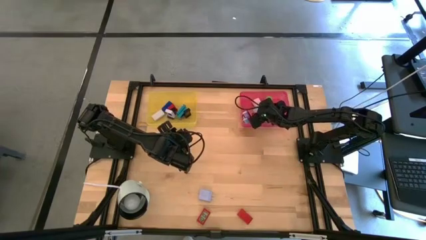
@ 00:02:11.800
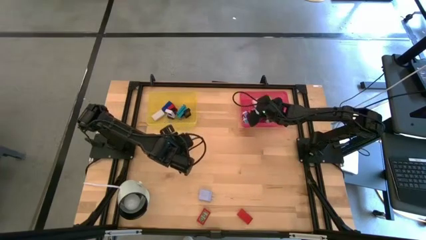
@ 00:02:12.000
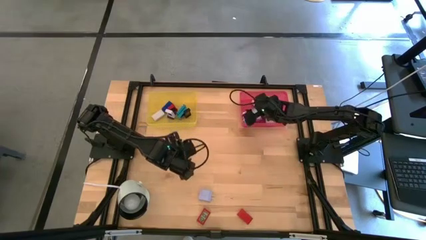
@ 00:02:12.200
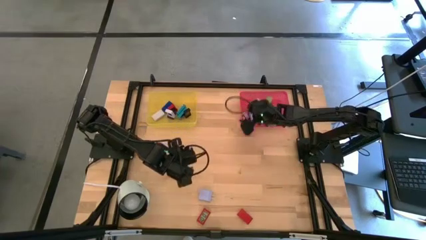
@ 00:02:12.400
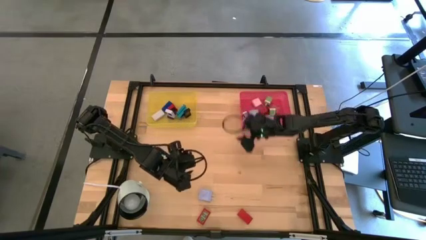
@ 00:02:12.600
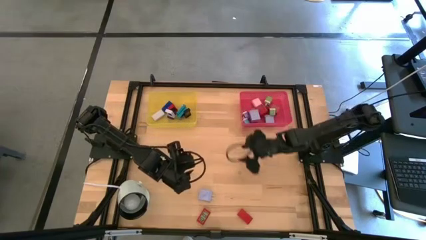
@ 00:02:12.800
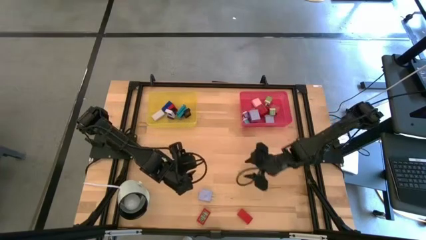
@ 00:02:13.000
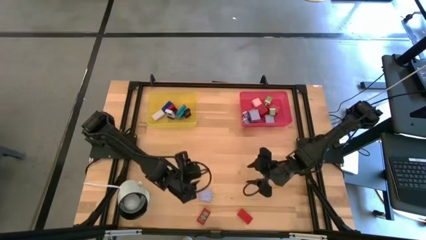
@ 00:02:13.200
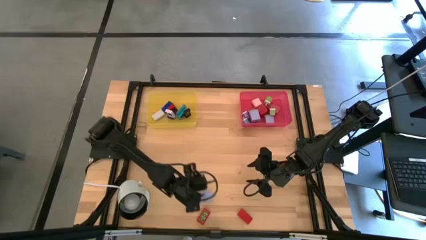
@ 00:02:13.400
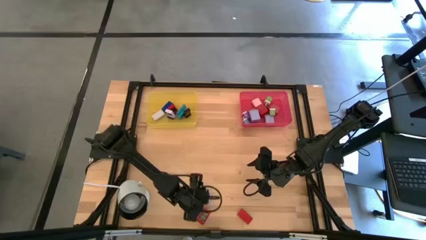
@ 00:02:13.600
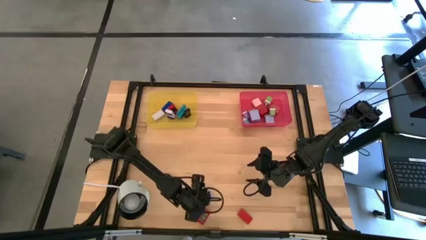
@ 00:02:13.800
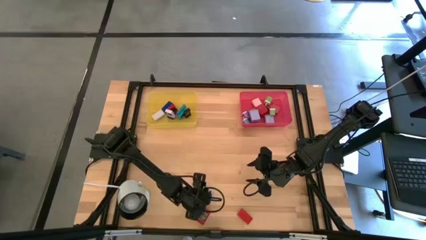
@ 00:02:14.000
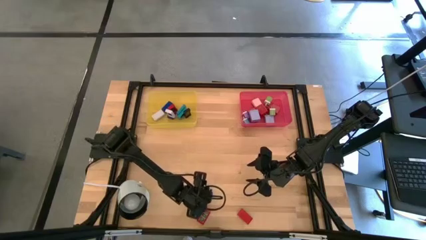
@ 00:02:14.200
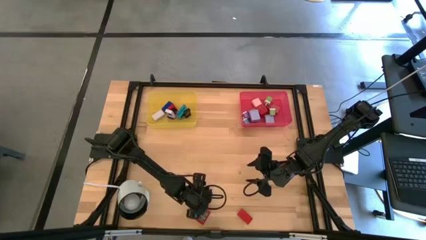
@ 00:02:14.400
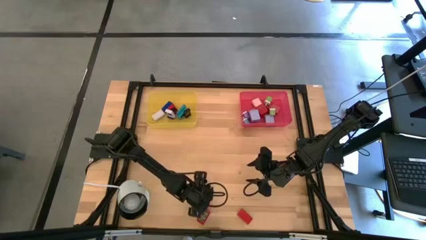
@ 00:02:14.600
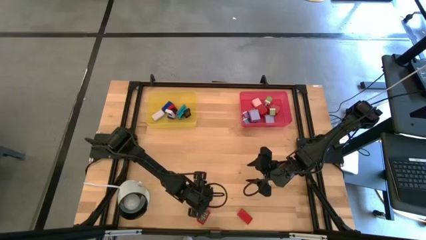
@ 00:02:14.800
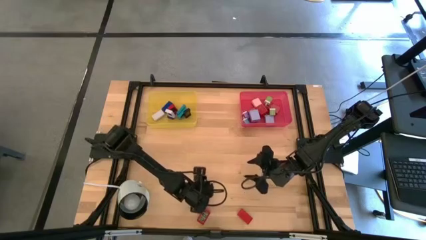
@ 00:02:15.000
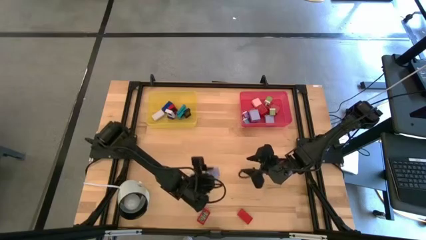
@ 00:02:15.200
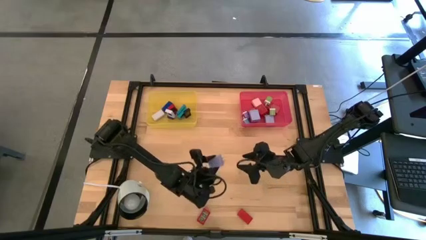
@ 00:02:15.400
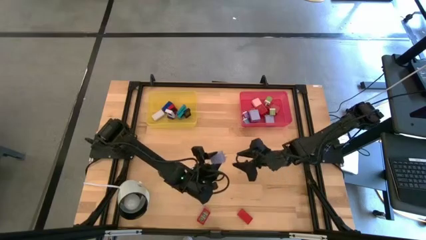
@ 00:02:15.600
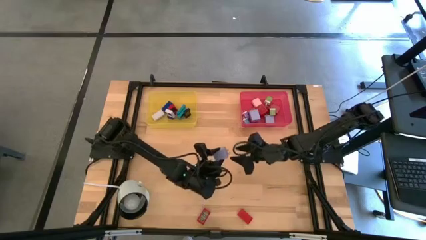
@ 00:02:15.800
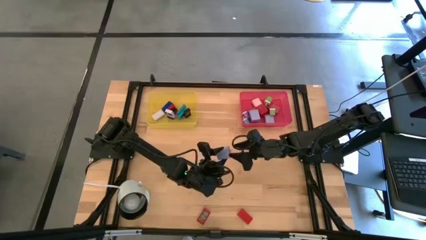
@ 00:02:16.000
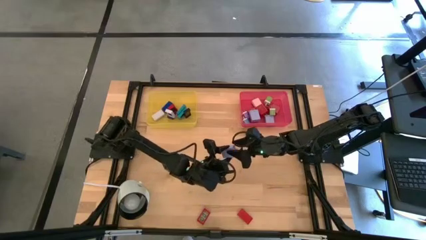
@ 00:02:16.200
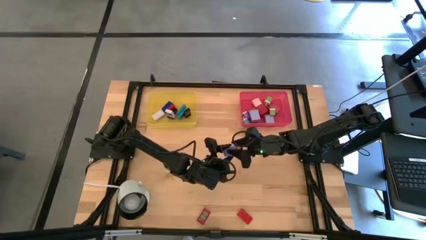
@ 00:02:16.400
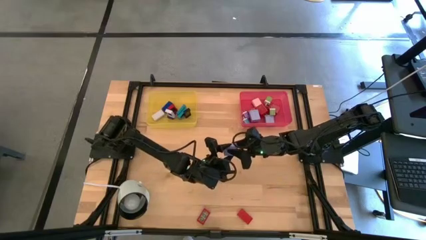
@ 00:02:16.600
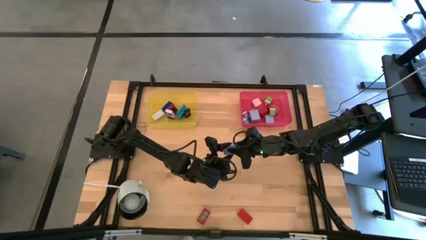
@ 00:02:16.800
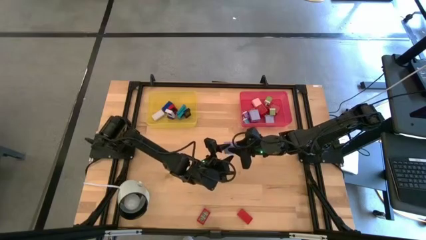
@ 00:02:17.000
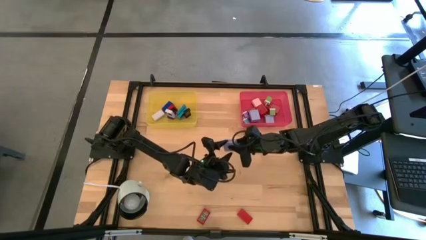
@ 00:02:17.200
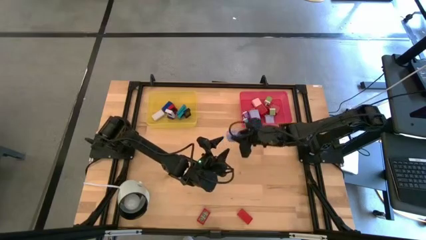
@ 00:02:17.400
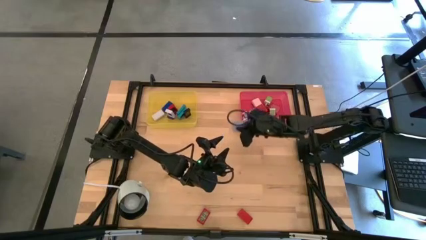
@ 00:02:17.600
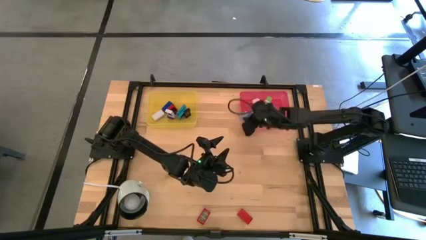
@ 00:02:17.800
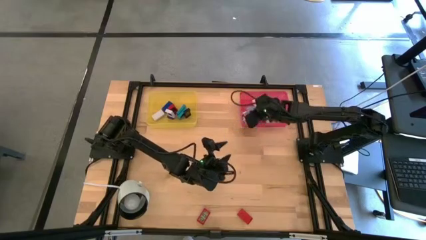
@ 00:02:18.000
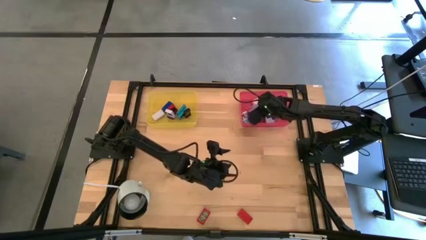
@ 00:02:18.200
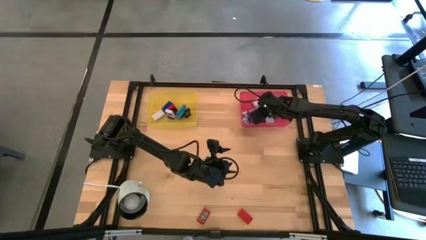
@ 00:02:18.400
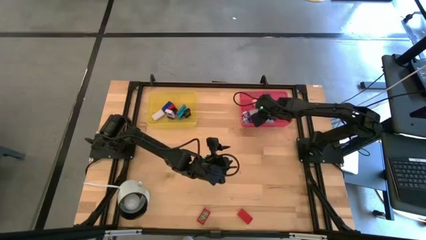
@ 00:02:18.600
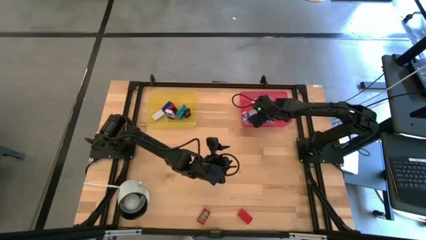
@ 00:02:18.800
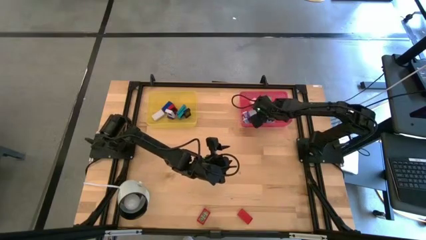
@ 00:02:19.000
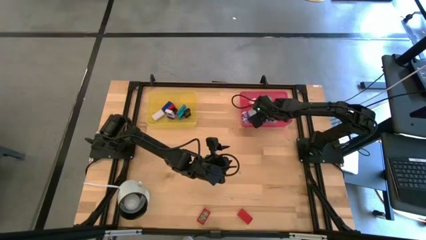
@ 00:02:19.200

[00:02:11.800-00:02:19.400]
Task: Pick & Place Office items
Put the purple charger adapter into the red bin

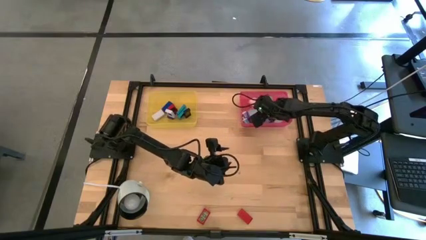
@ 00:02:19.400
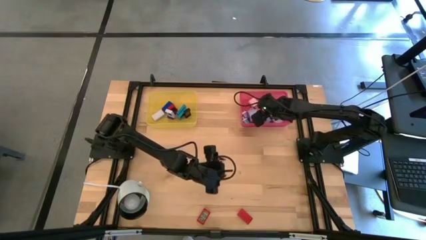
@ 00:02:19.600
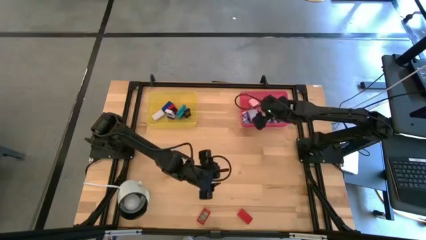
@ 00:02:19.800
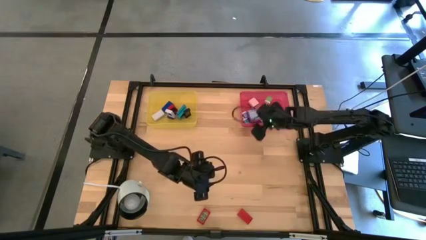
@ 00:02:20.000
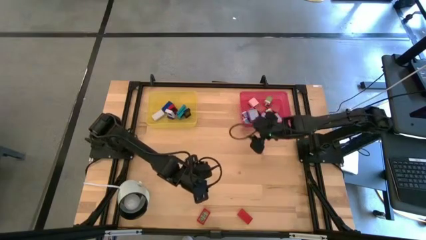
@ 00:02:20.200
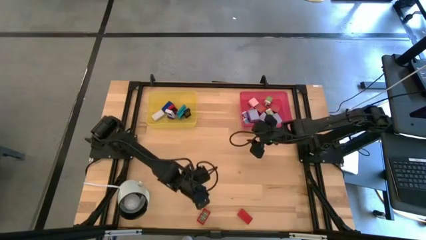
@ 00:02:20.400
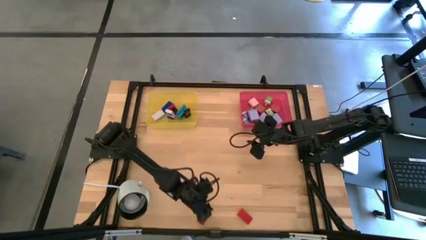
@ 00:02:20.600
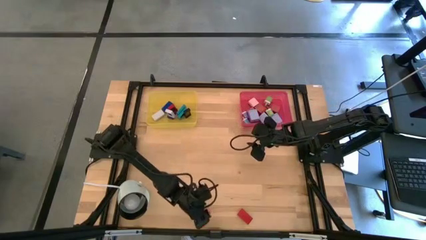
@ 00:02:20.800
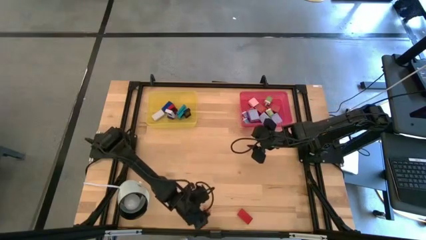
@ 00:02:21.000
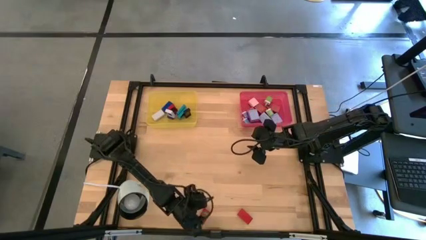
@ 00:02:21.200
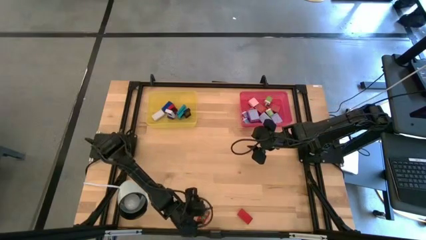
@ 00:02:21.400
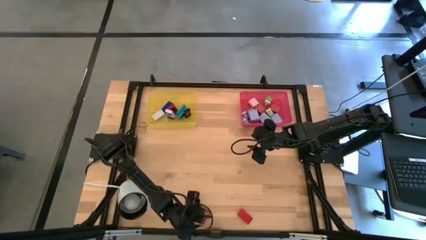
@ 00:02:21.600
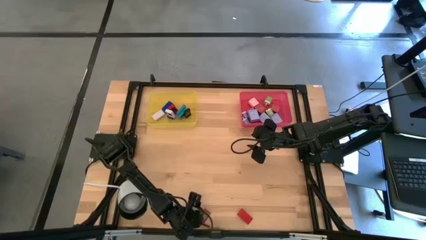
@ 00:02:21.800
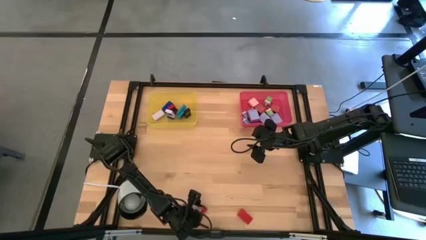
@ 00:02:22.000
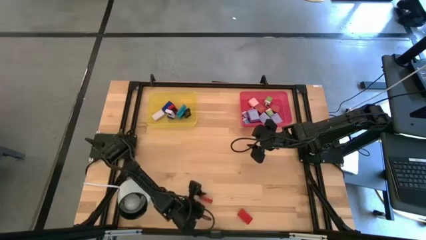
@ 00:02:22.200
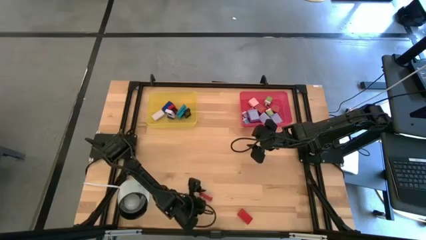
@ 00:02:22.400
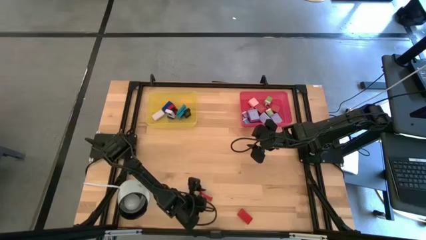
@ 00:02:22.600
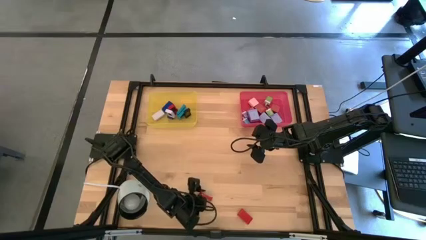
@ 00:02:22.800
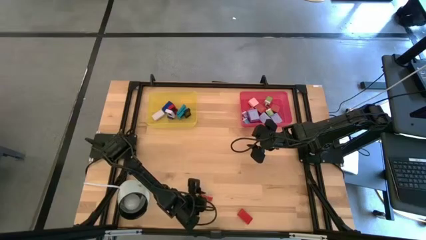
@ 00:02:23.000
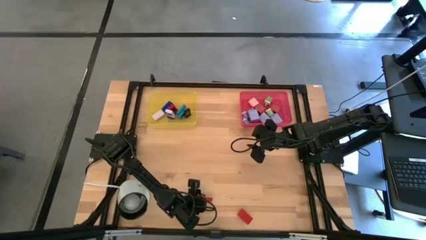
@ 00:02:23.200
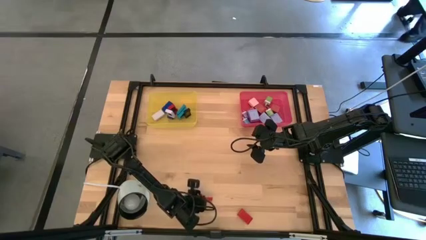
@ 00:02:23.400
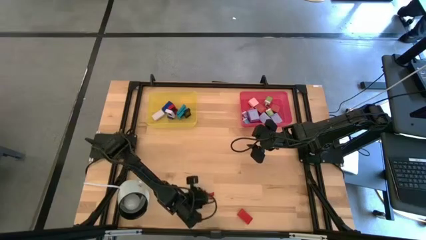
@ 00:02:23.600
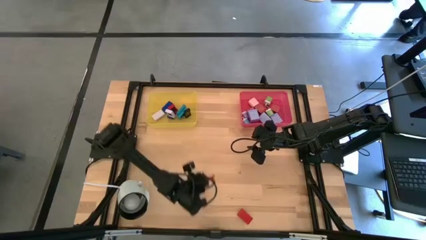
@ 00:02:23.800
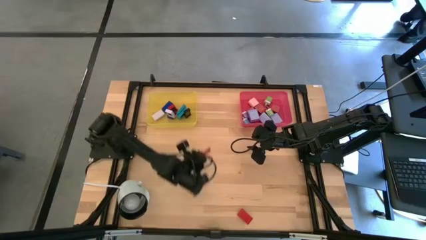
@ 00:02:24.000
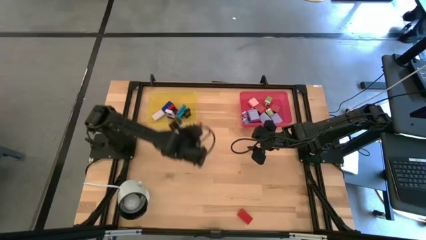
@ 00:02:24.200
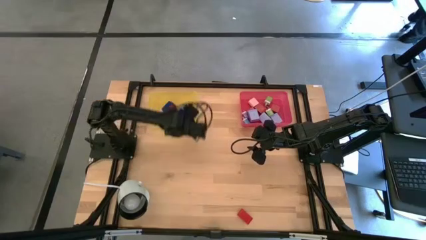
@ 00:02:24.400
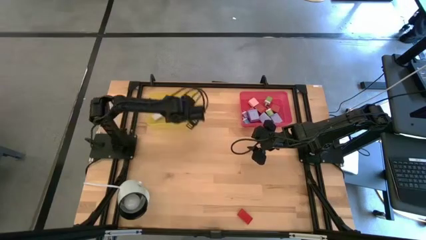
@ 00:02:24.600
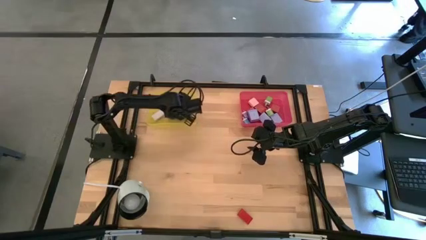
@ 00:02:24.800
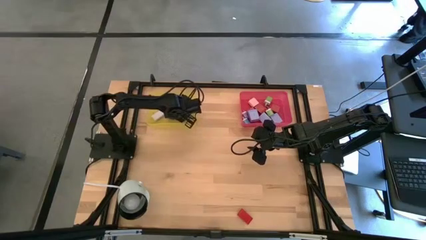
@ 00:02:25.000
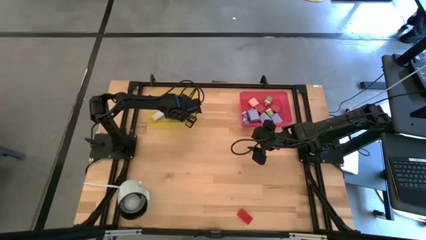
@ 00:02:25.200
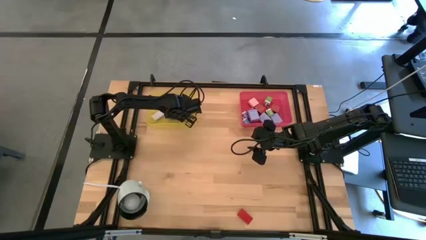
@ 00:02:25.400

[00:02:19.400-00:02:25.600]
Put the left red digital clock into the yellow bin
